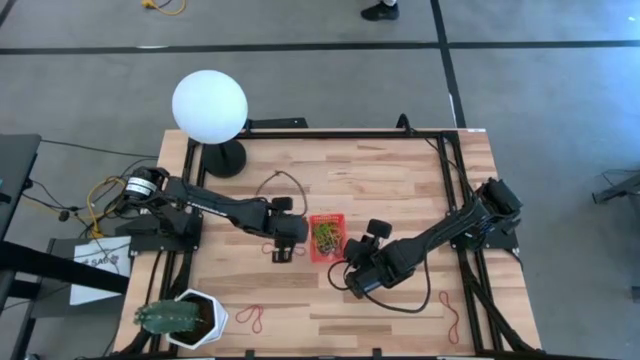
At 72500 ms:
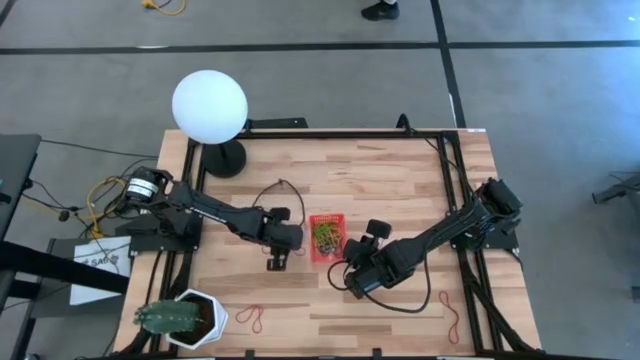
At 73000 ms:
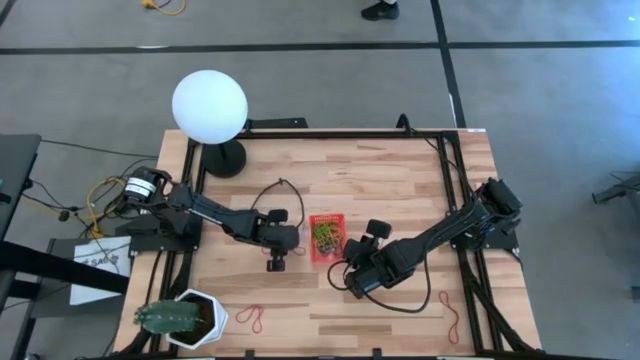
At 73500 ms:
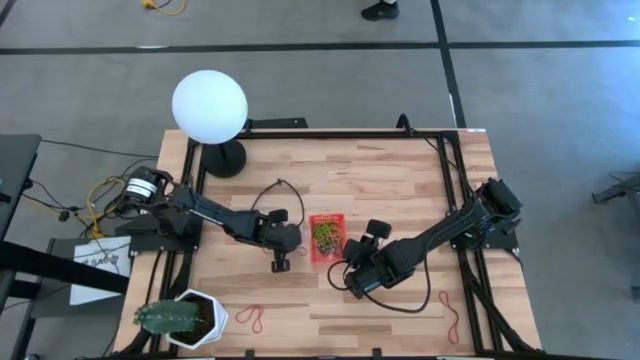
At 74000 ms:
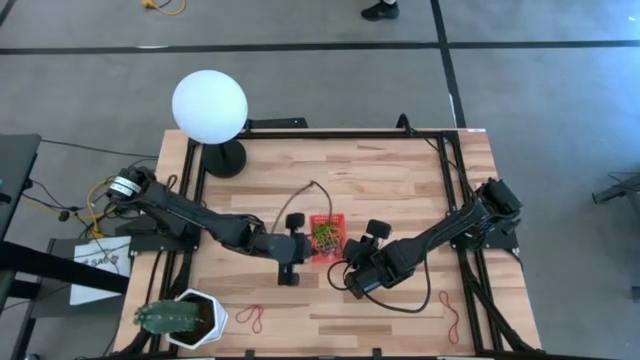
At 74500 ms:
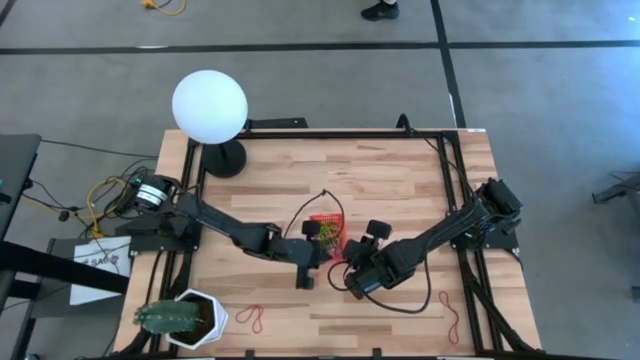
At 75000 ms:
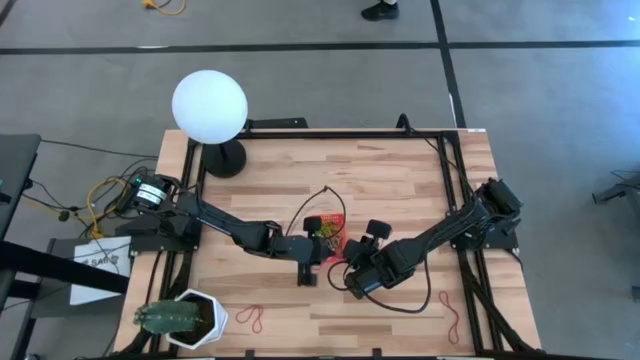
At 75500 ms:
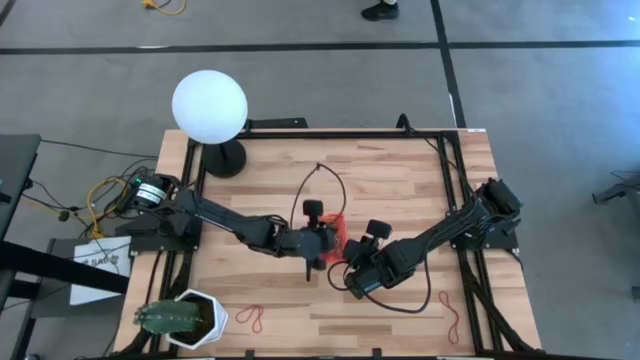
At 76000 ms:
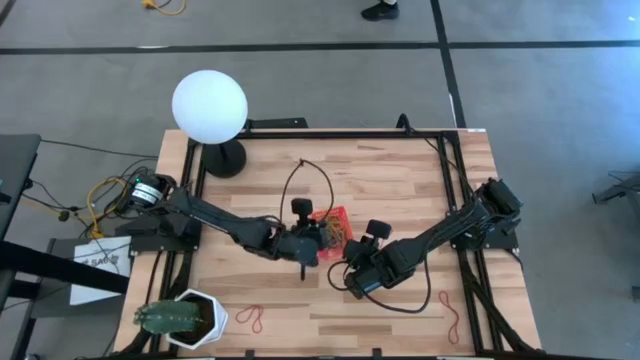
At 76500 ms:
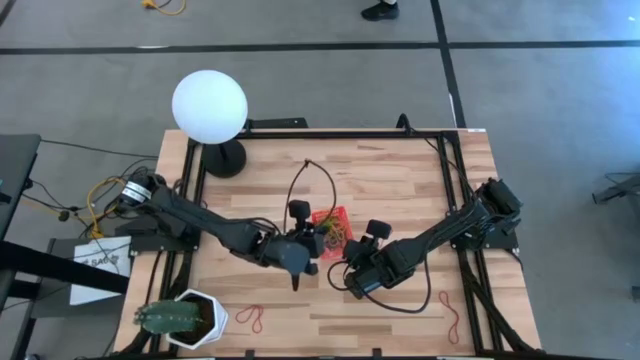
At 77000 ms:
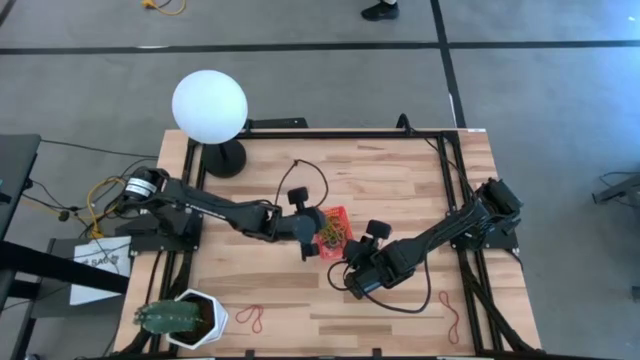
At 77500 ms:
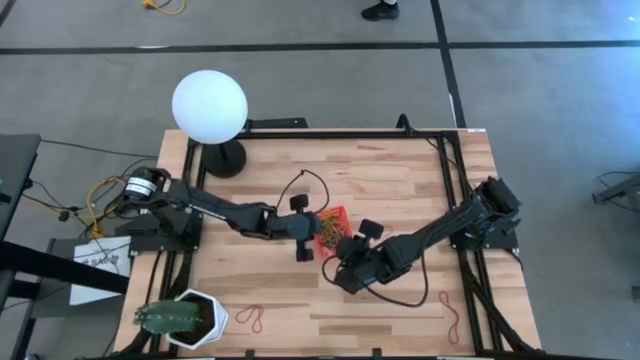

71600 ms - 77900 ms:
Task: Pick and place items into bin
Put the red rubber band into the orange bin

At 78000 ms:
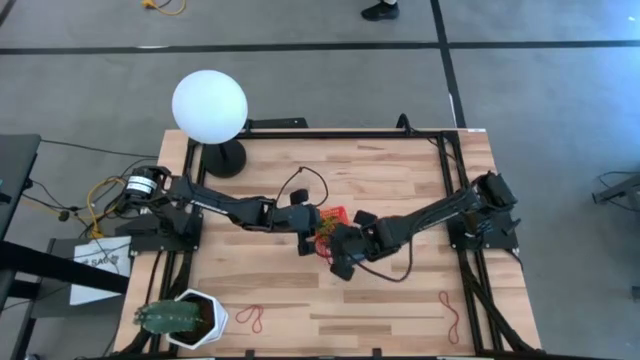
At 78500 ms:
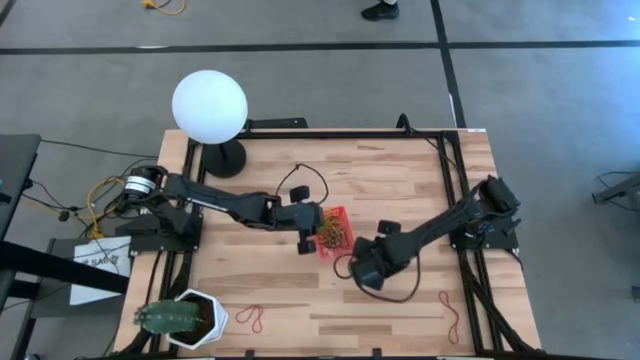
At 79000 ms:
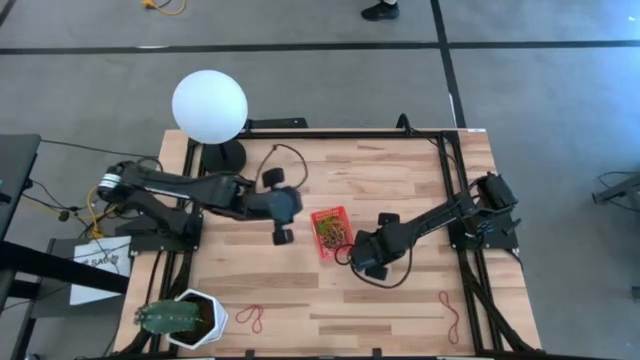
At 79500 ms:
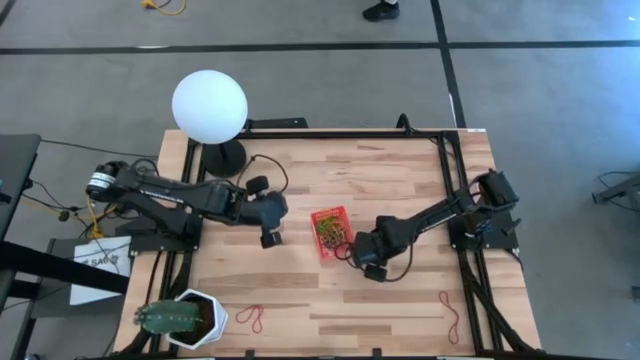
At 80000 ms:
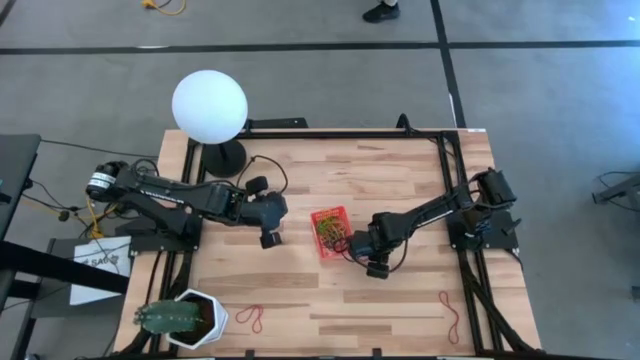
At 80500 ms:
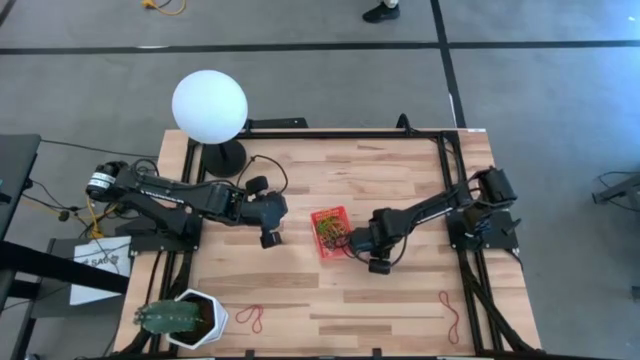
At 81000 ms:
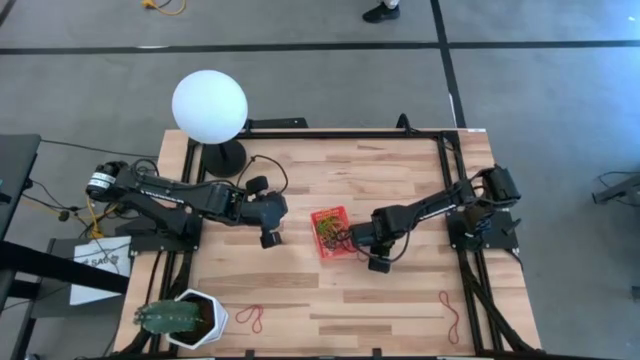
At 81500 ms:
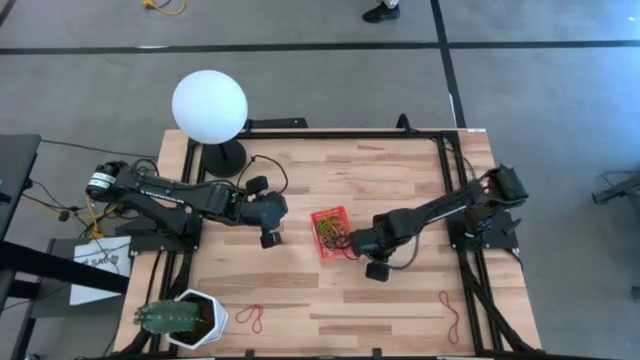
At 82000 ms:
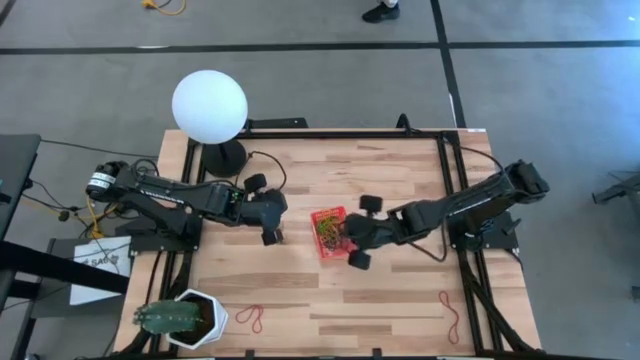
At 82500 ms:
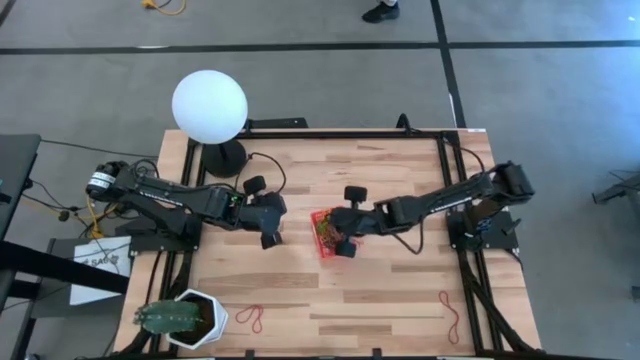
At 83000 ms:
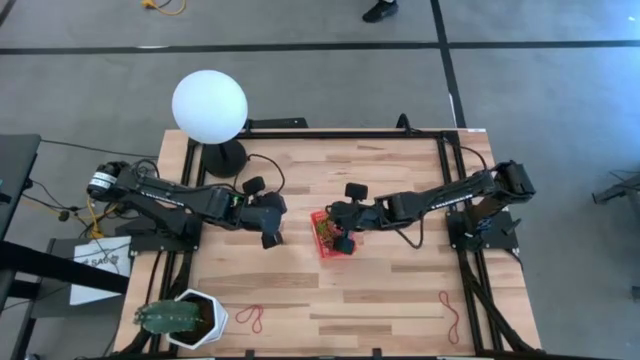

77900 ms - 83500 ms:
Put the red rubber band into the orange bin

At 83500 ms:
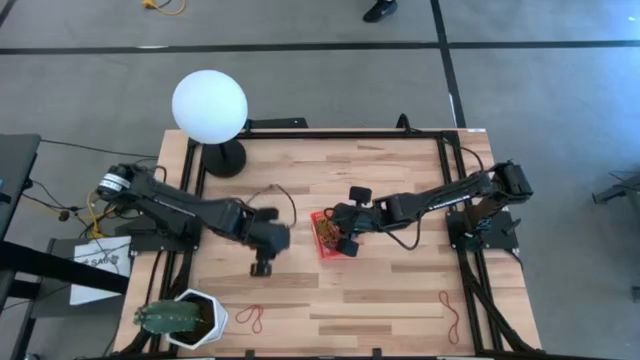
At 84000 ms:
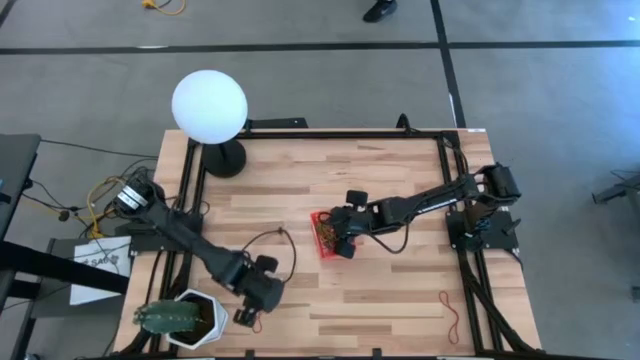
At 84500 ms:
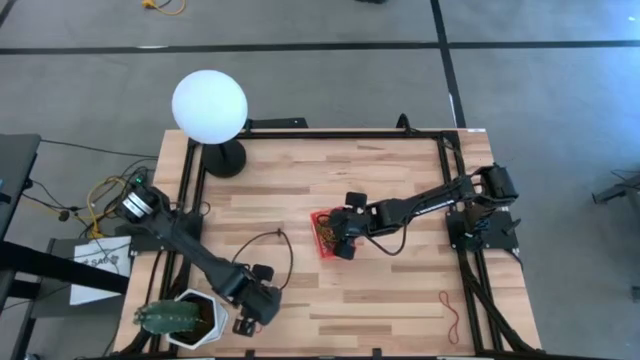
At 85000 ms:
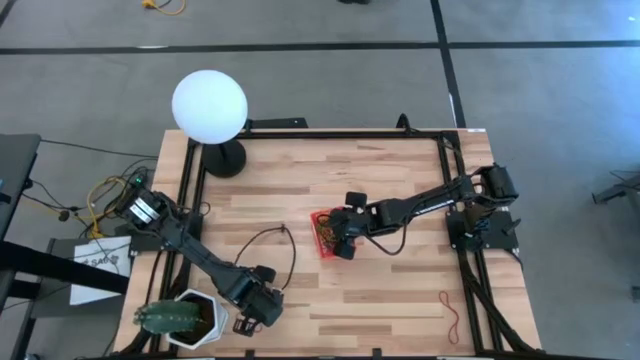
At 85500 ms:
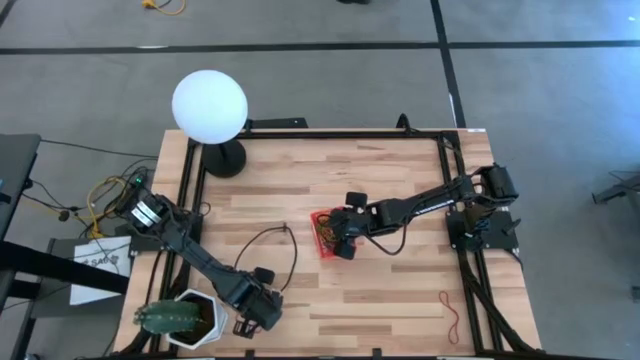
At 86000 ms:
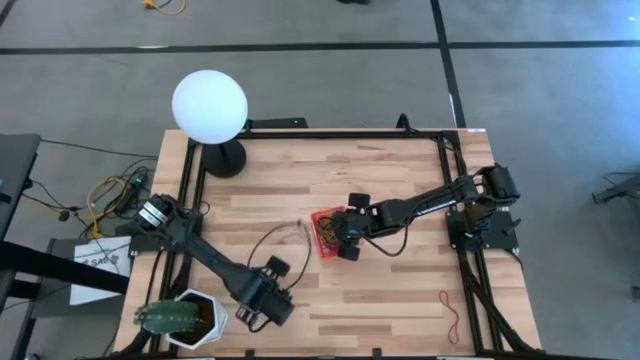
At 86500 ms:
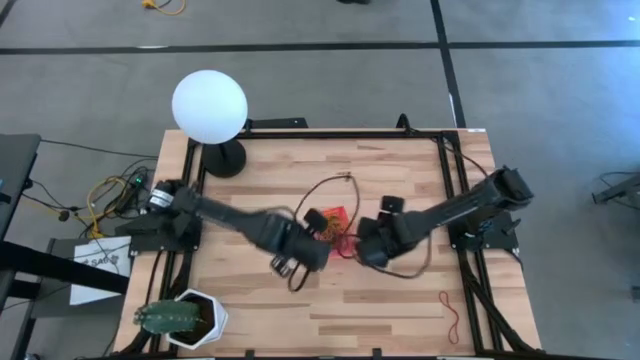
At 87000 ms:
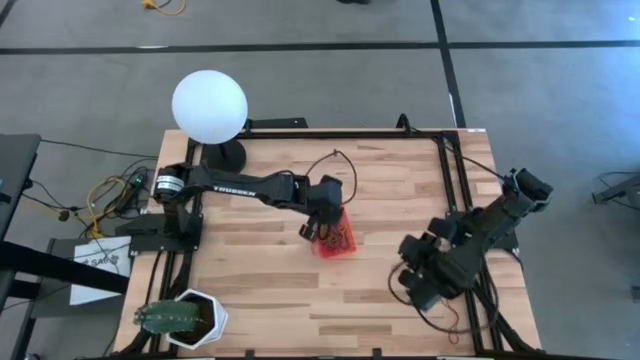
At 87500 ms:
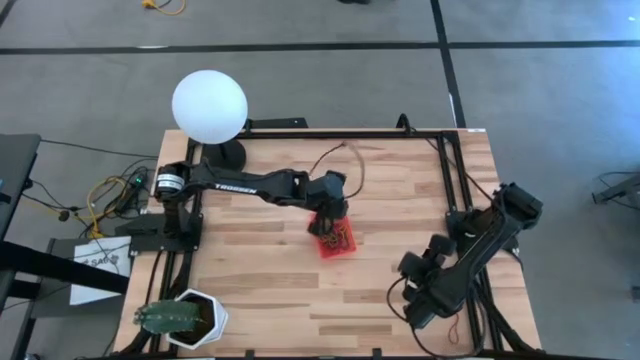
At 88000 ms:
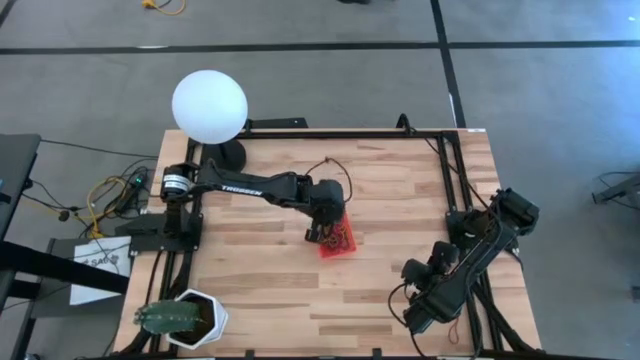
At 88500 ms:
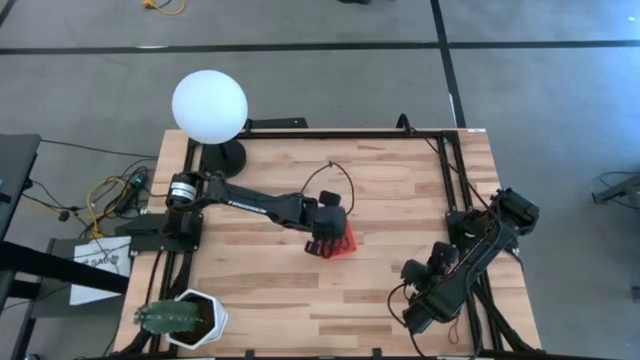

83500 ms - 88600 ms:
Put the red rubber band into the orange bin

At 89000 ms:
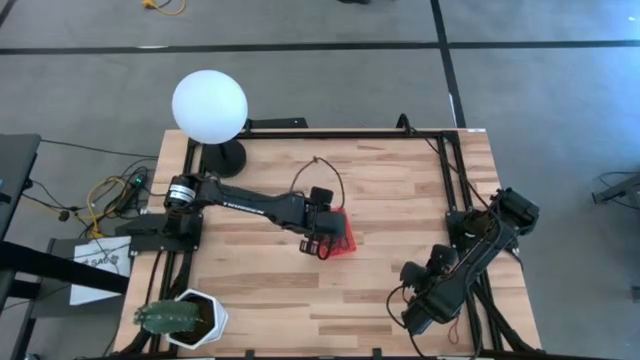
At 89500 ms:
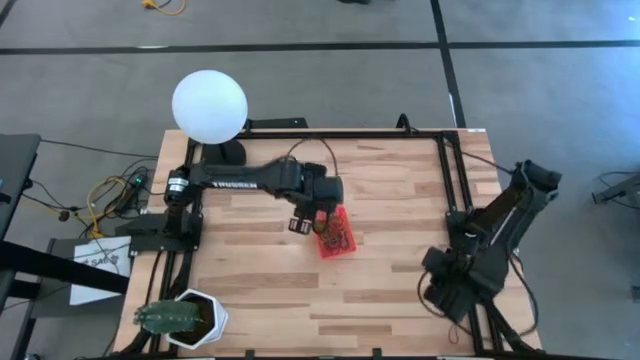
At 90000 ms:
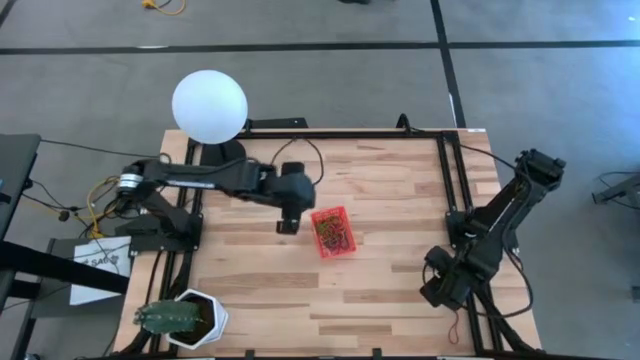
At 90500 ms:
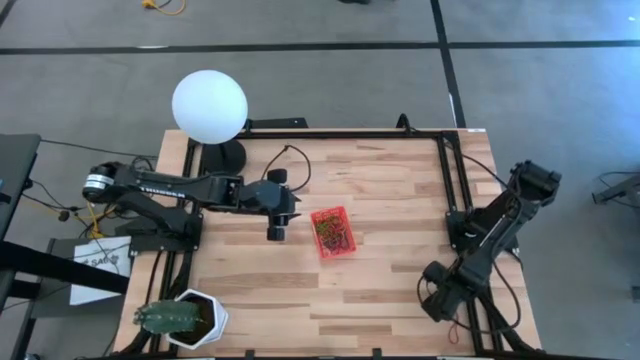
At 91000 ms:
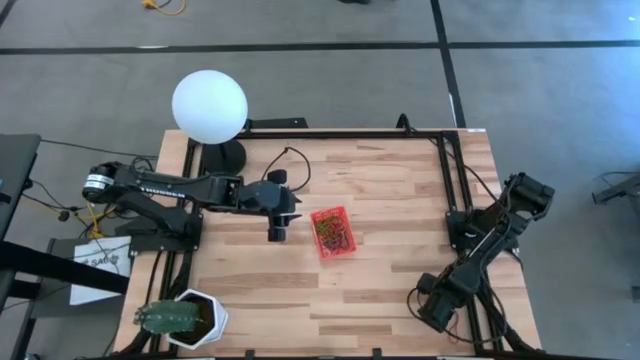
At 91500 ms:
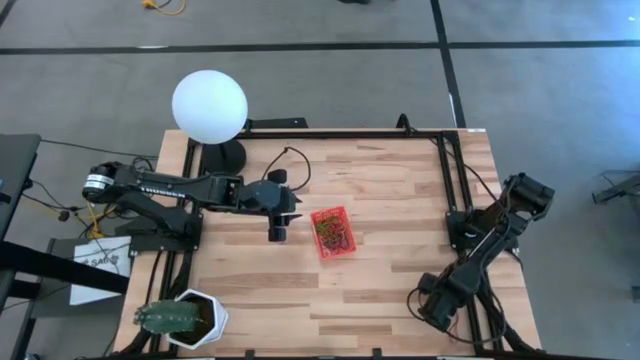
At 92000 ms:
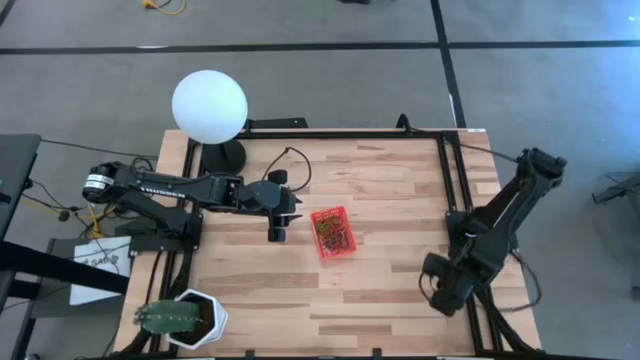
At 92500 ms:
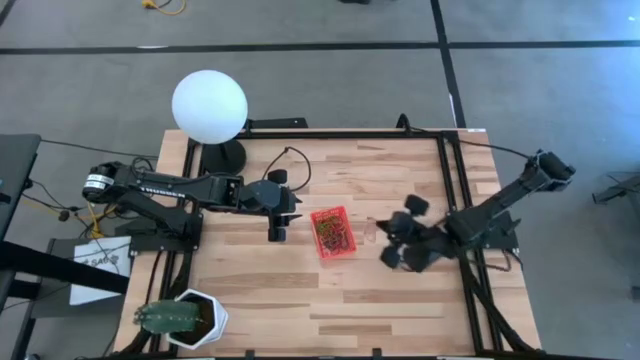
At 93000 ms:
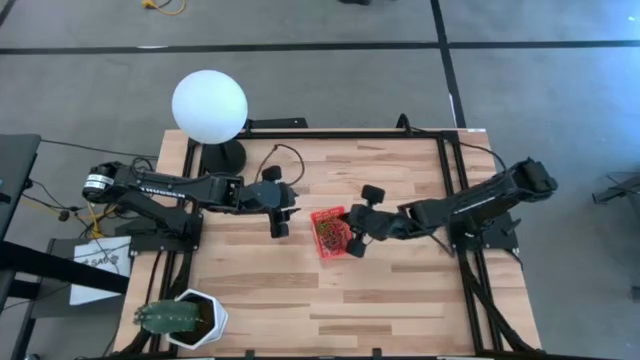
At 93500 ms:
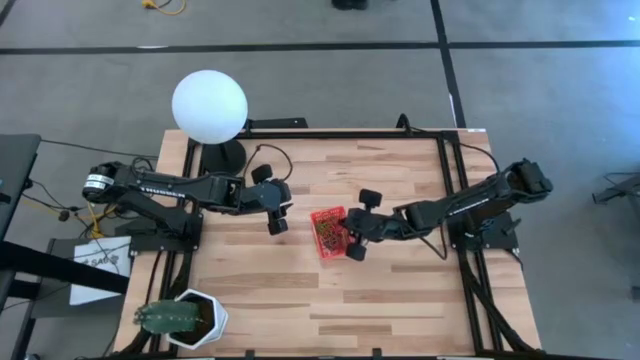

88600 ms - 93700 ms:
Put the red rubber band into the orange bin
